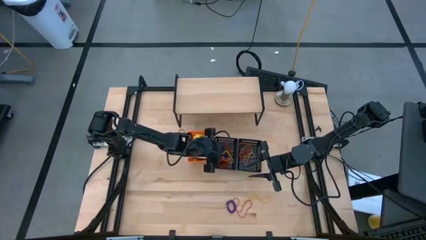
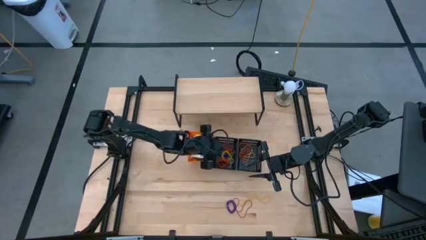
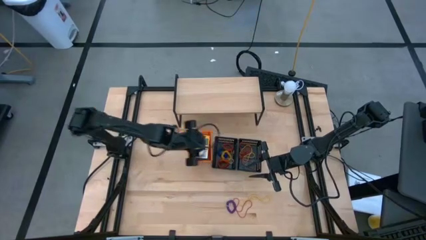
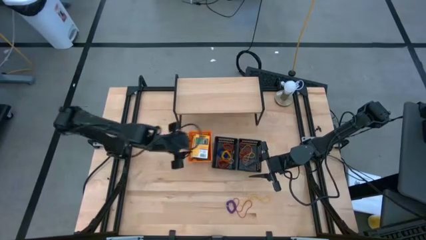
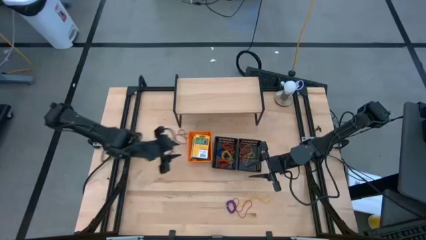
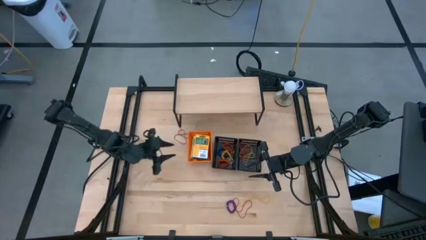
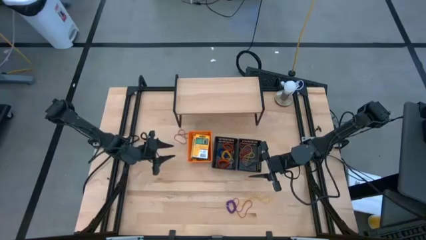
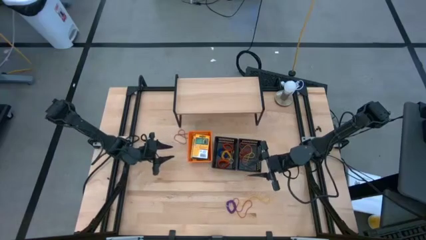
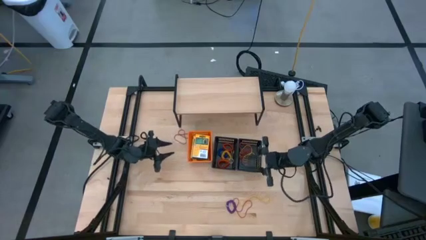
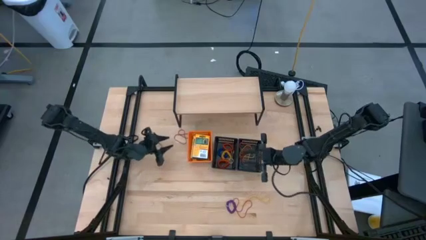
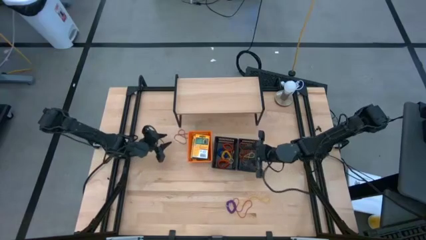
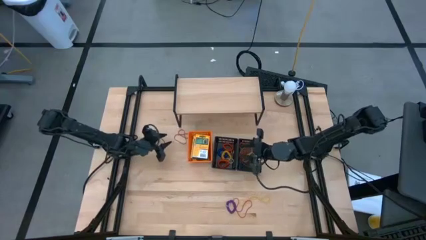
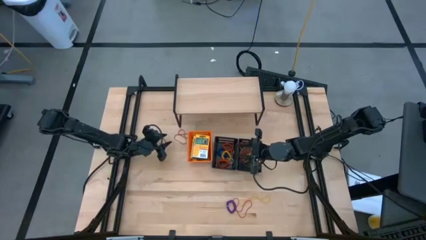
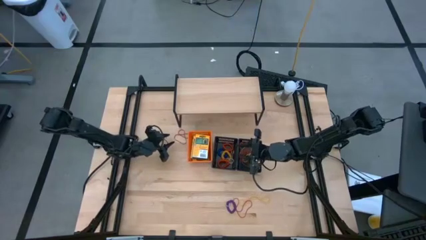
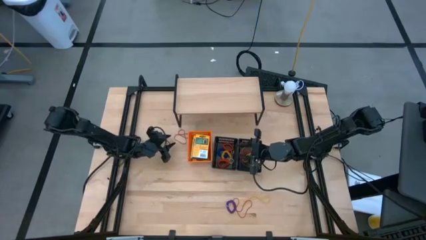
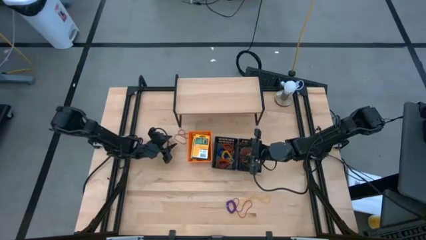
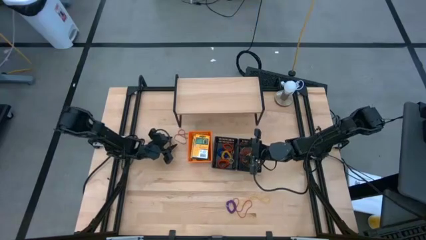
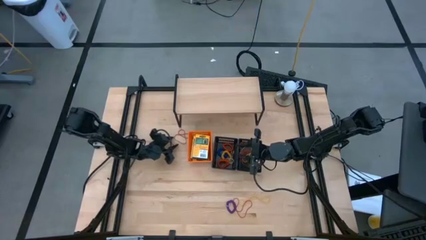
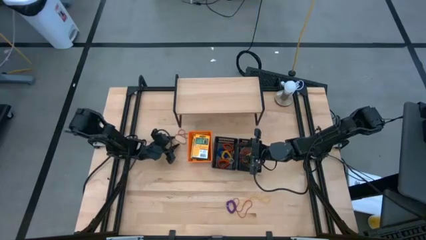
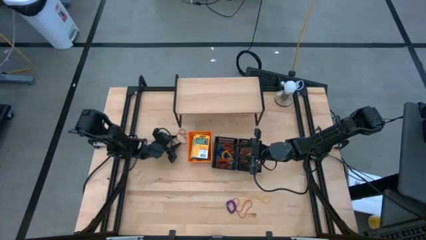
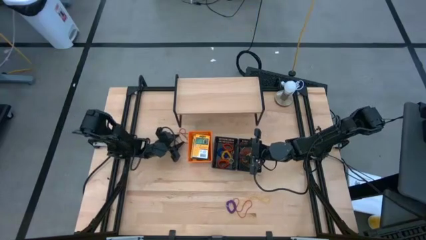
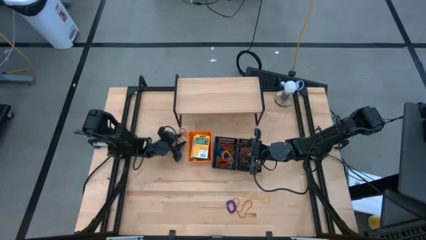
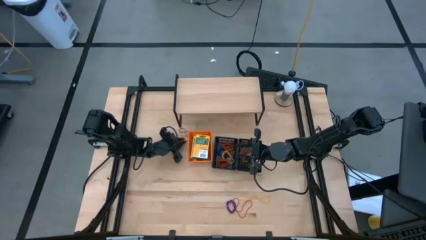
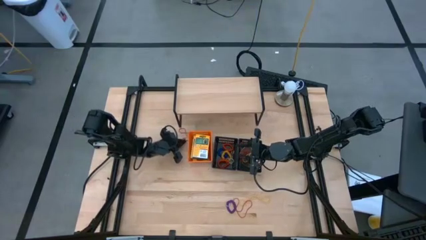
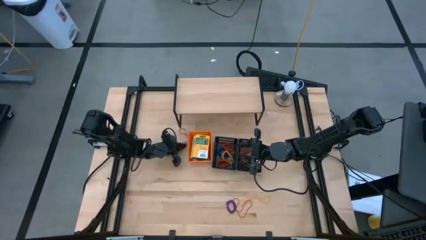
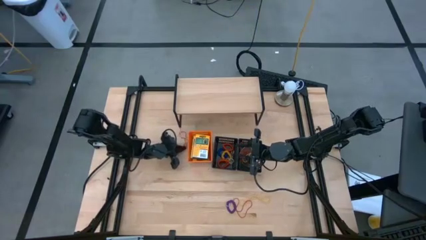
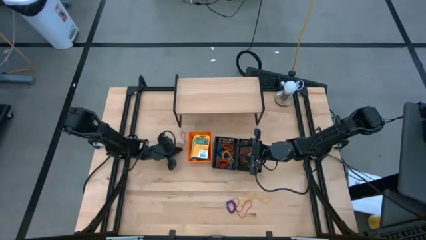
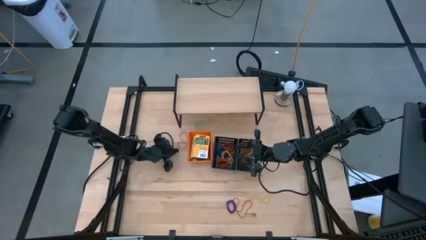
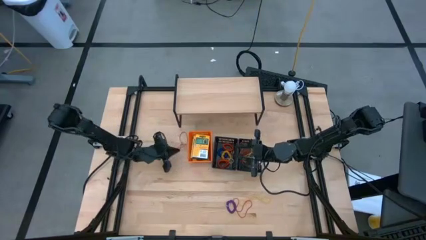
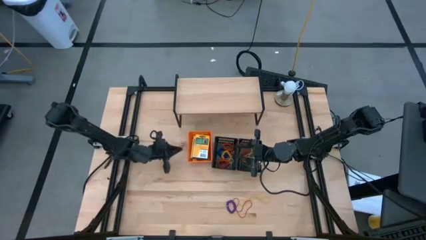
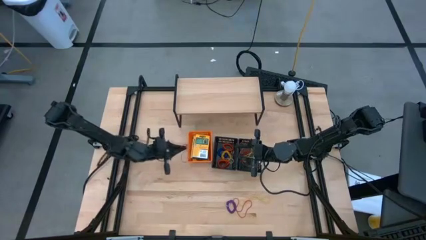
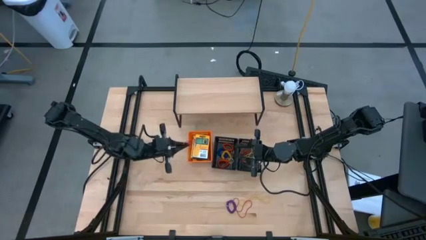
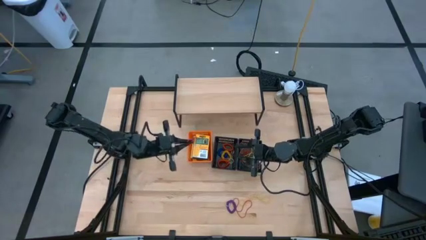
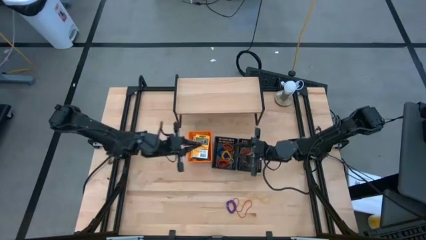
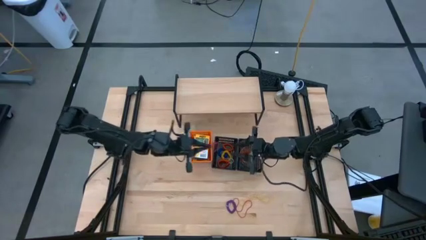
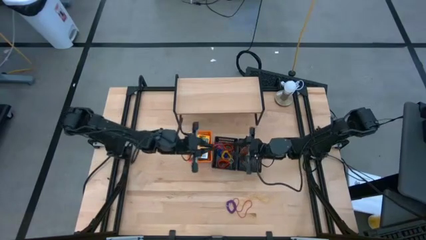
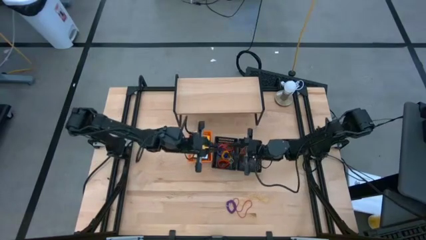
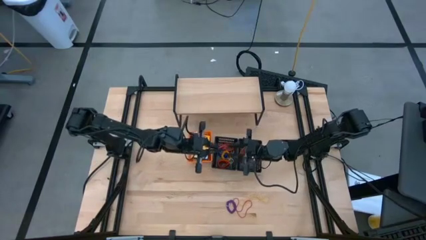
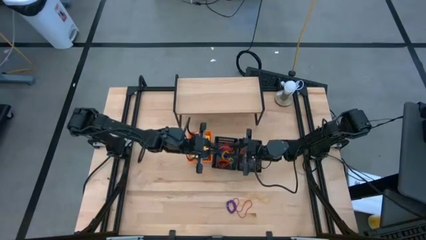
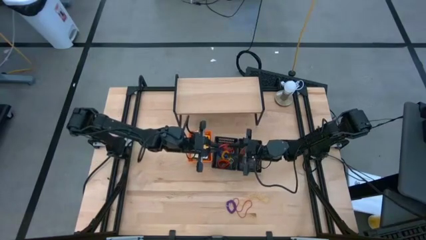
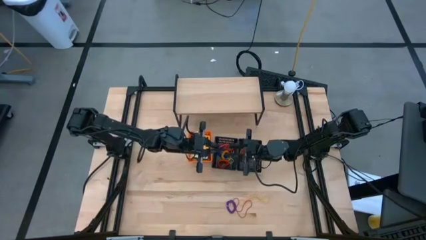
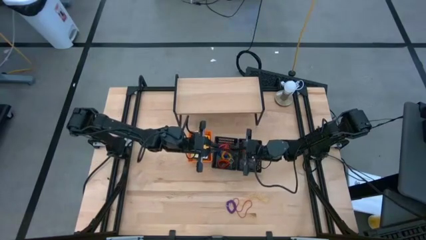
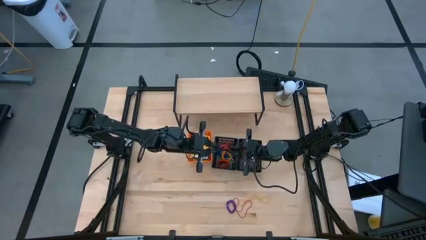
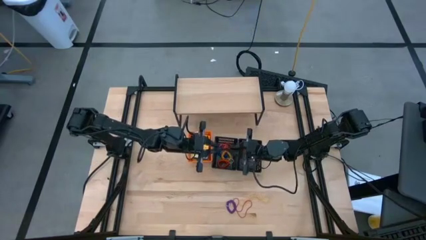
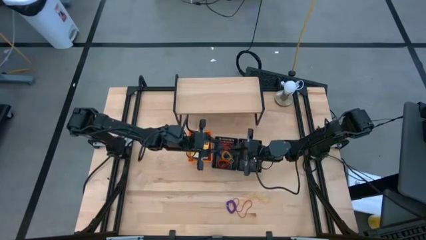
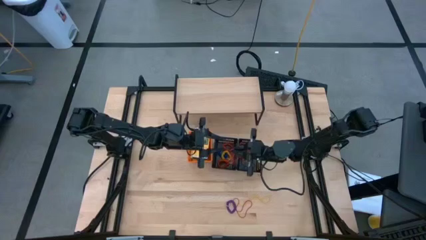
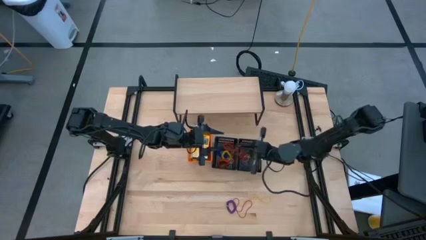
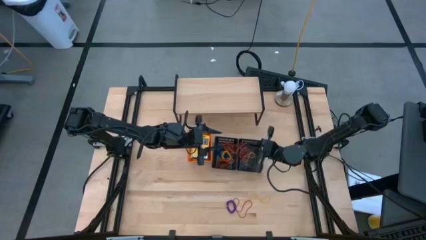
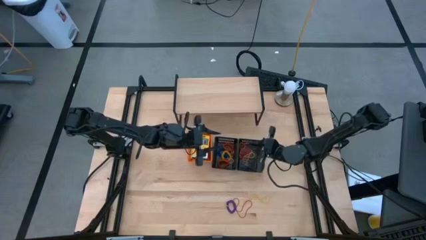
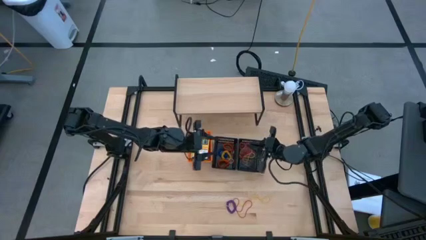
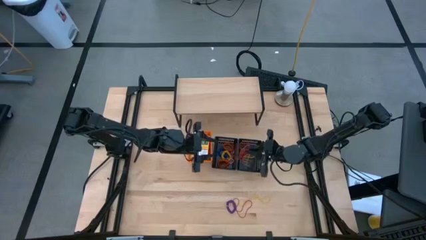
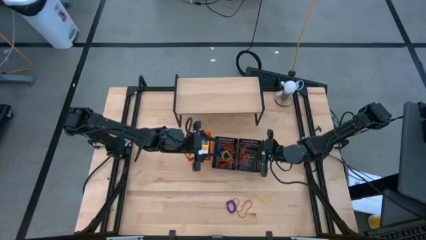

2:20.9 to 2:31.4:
Task: Pick & Place Office Desk Supplies
Put the red rubber band into the right black bin

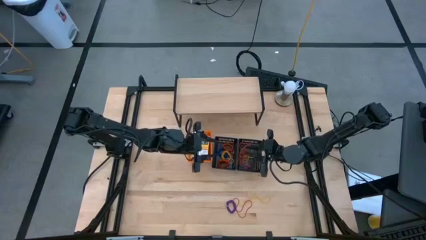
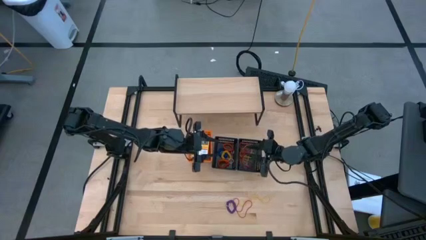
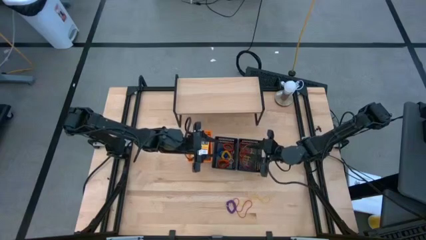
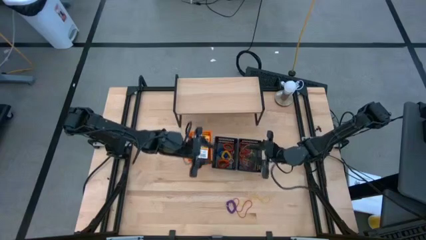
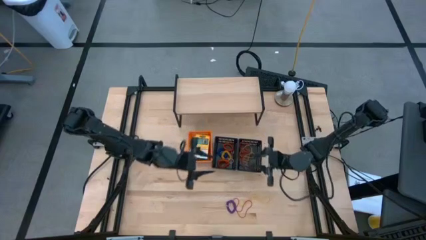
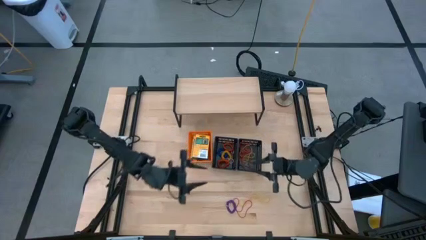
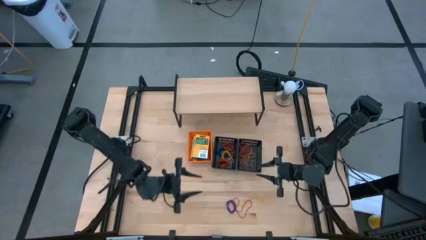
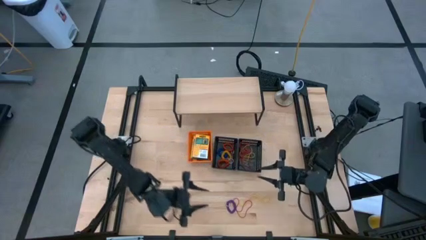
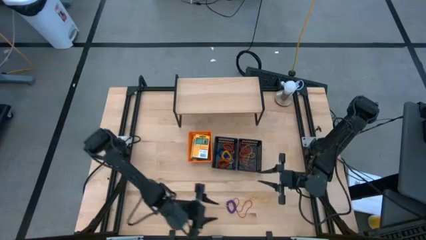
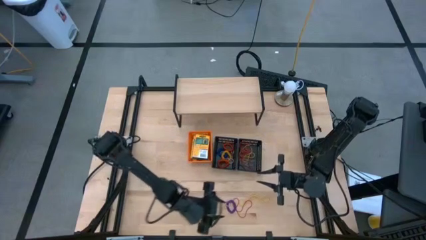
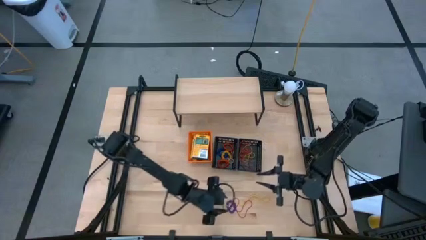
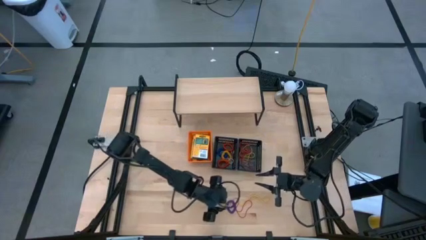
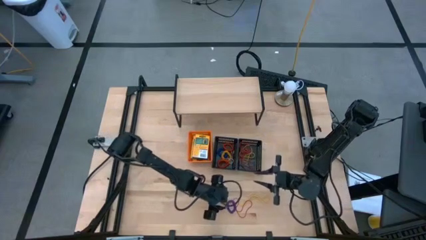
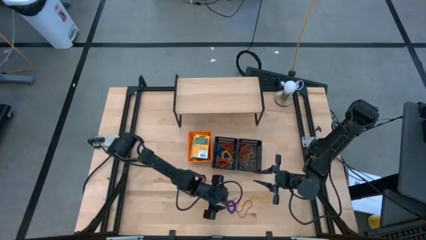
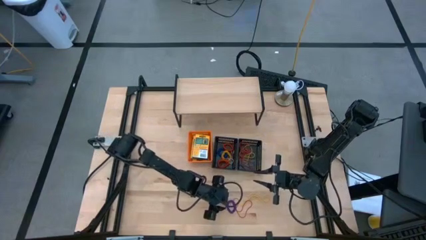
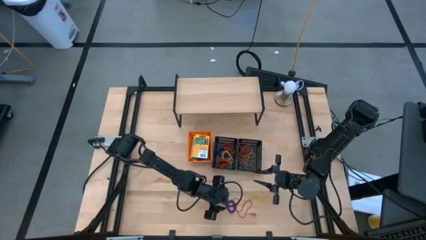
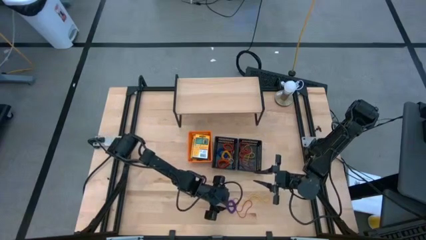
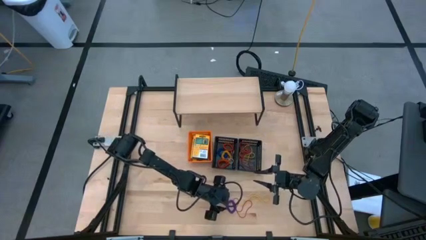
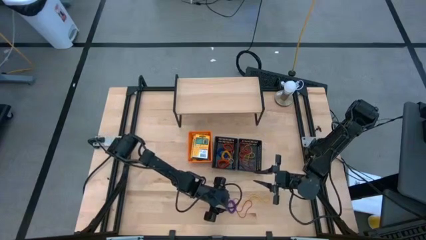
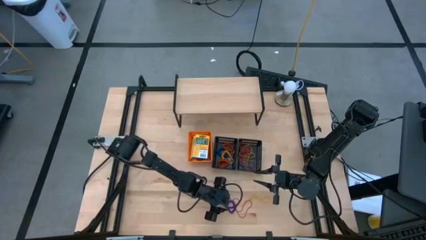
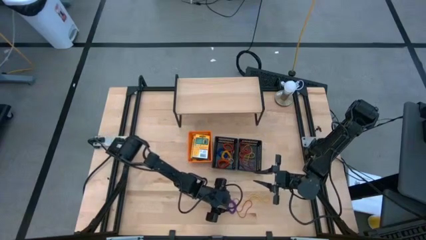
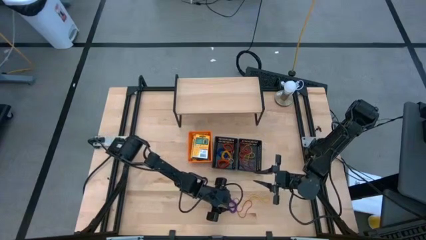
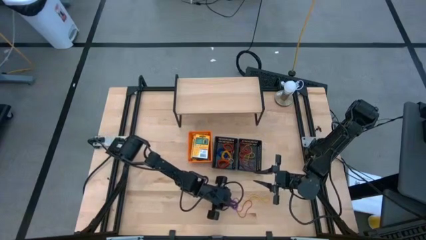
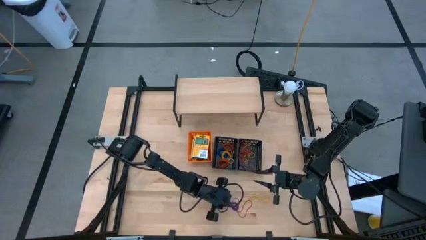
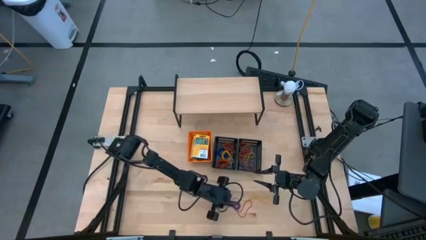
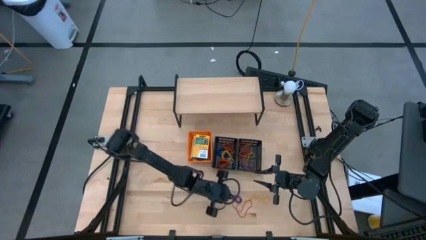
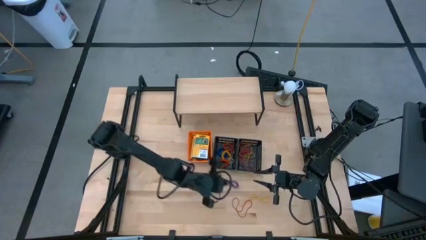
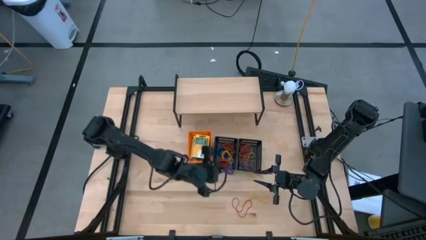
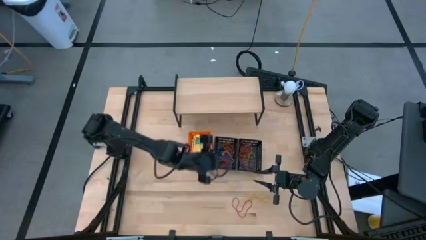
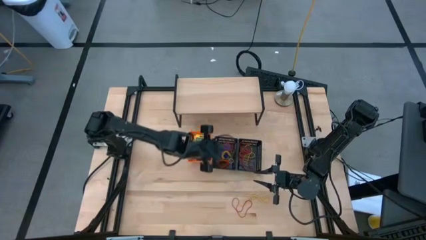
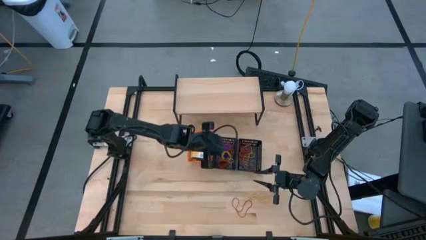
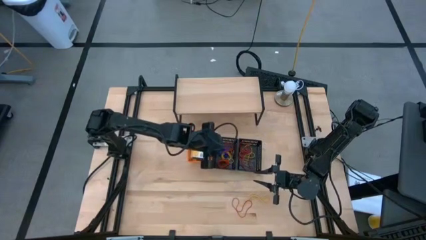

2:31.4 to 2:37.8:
Put the purple spring keychain into the left black bin
